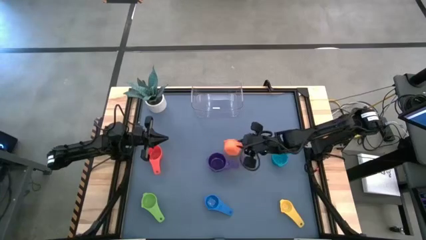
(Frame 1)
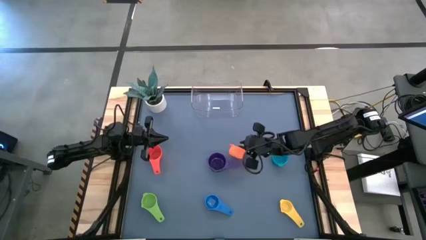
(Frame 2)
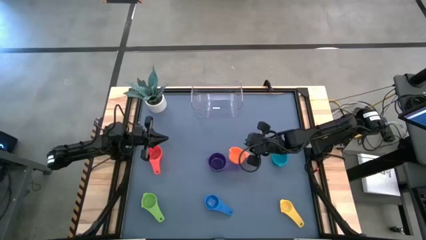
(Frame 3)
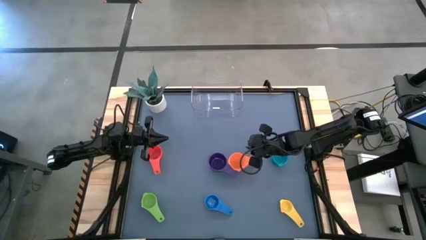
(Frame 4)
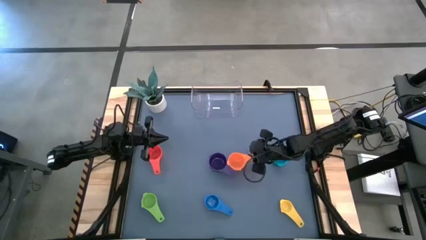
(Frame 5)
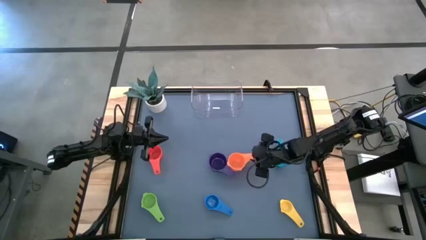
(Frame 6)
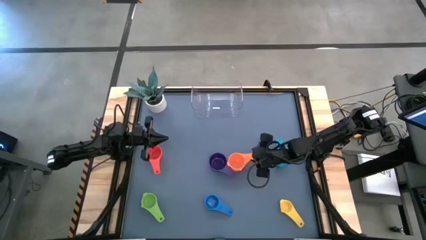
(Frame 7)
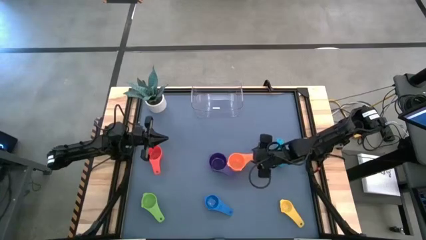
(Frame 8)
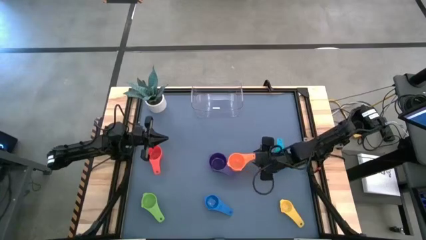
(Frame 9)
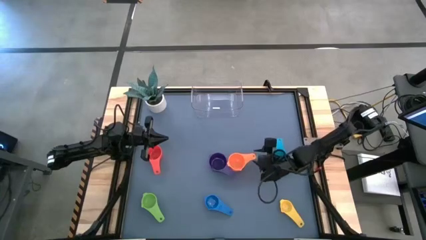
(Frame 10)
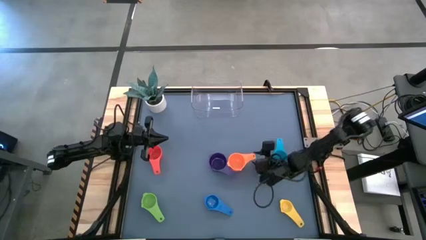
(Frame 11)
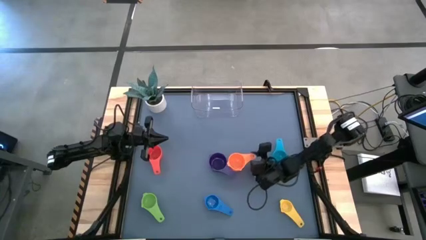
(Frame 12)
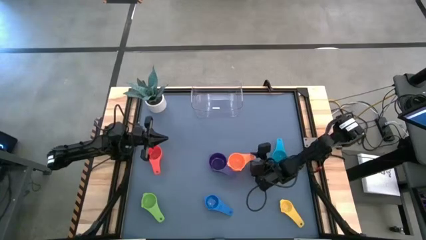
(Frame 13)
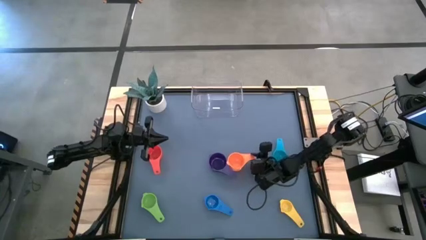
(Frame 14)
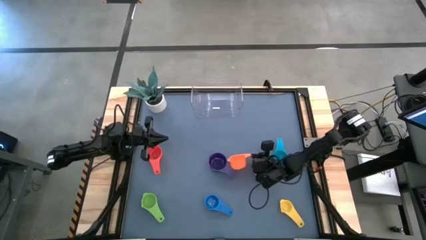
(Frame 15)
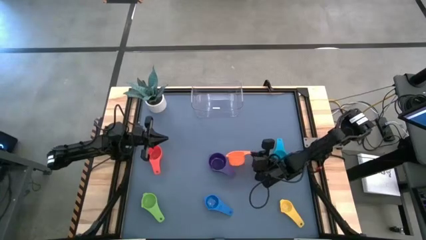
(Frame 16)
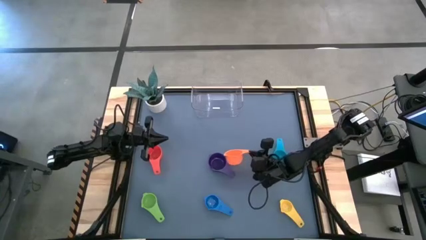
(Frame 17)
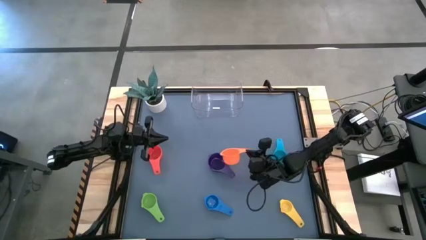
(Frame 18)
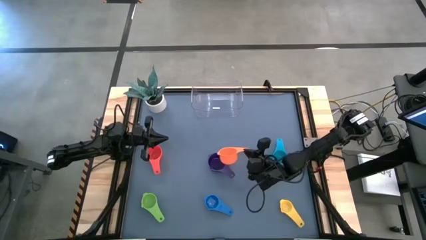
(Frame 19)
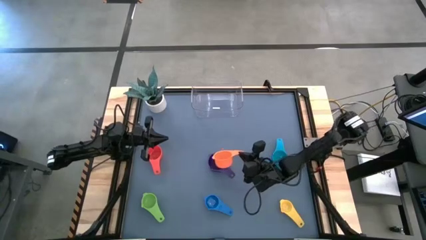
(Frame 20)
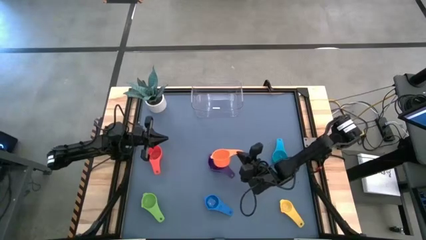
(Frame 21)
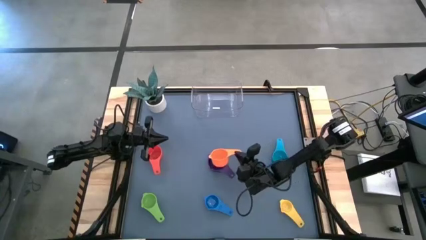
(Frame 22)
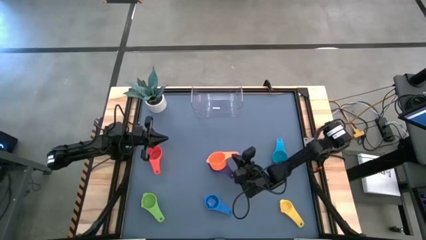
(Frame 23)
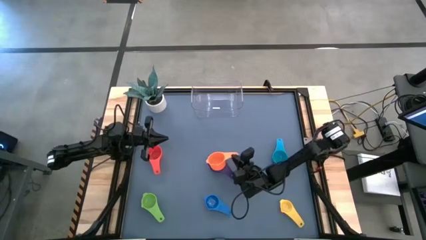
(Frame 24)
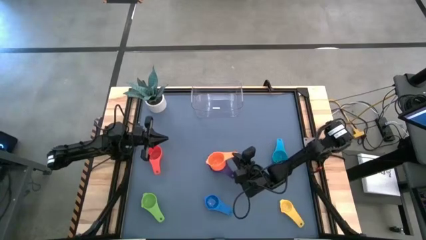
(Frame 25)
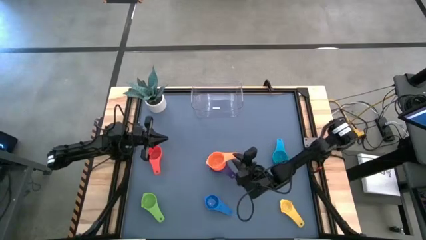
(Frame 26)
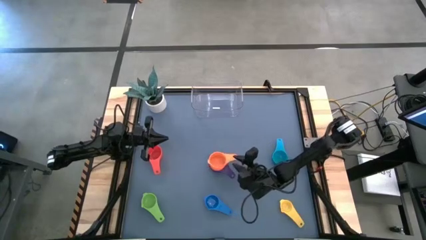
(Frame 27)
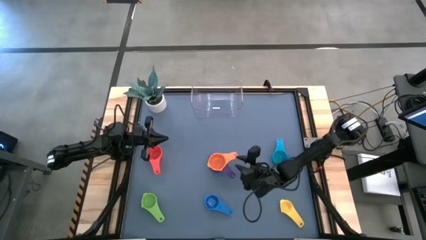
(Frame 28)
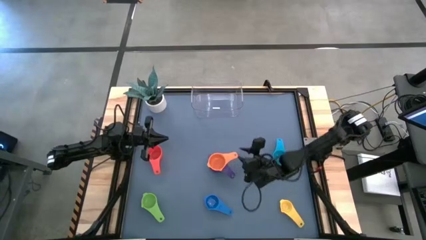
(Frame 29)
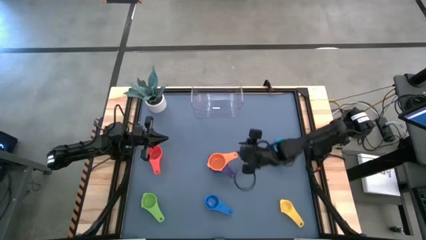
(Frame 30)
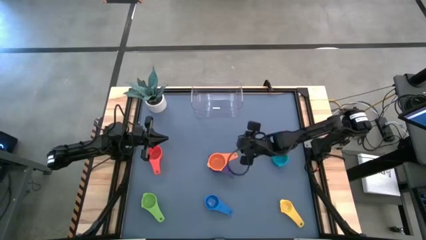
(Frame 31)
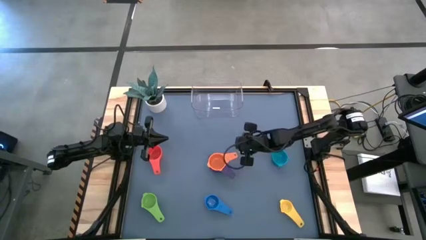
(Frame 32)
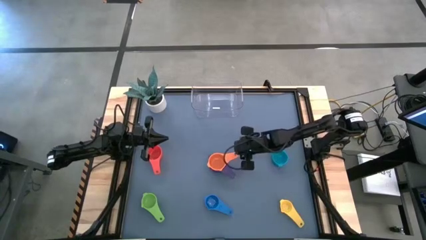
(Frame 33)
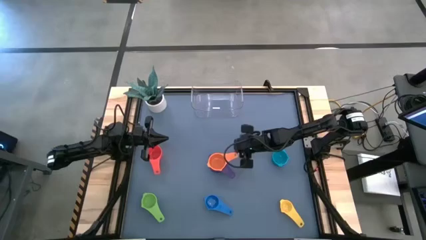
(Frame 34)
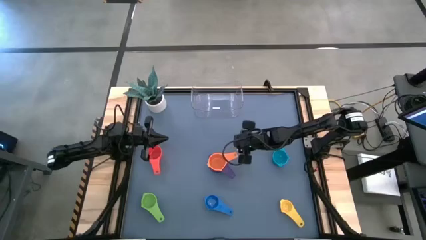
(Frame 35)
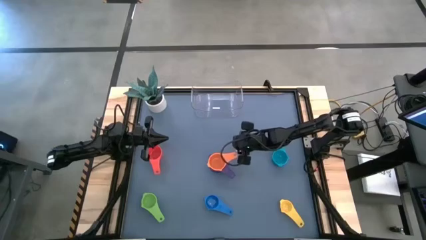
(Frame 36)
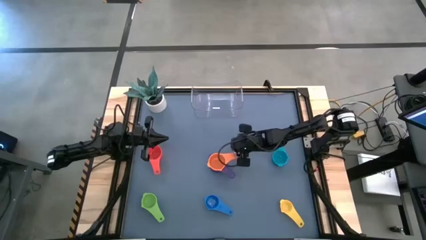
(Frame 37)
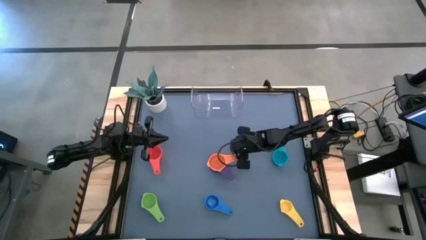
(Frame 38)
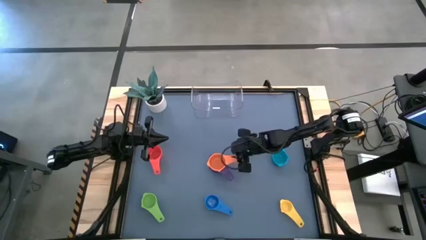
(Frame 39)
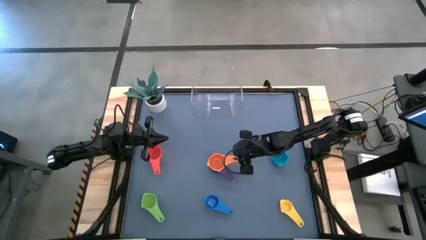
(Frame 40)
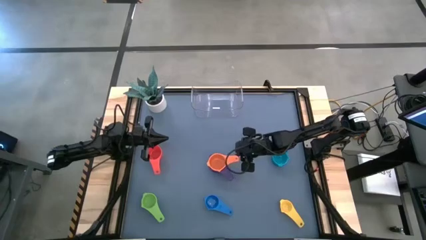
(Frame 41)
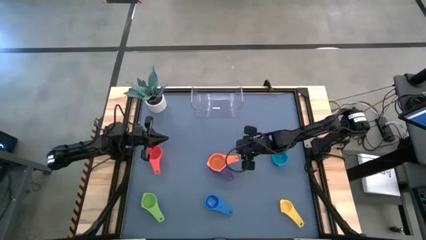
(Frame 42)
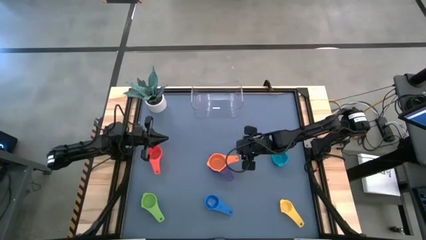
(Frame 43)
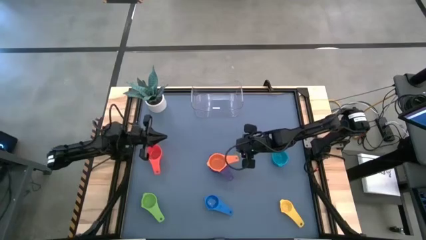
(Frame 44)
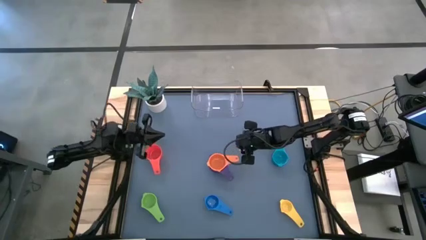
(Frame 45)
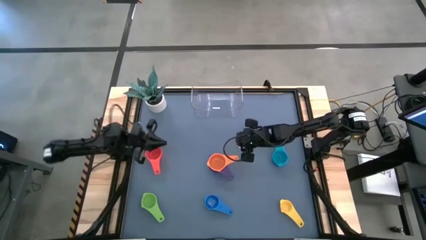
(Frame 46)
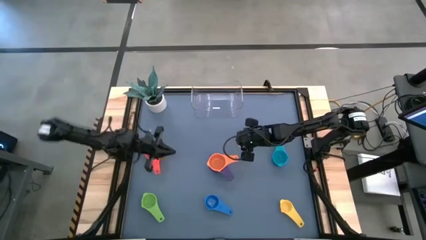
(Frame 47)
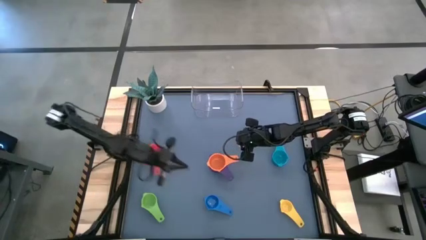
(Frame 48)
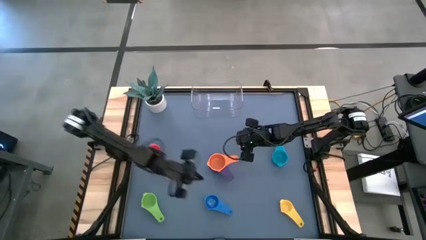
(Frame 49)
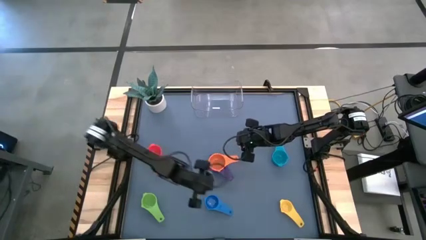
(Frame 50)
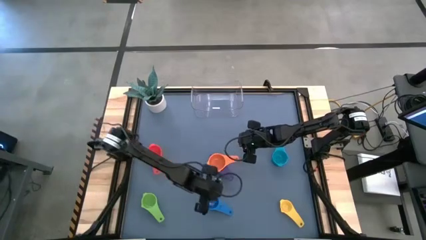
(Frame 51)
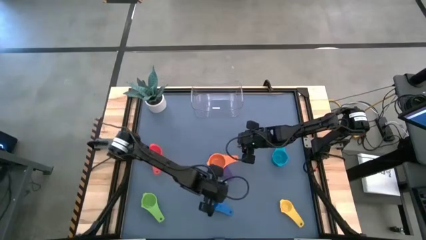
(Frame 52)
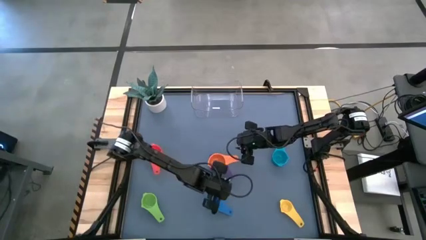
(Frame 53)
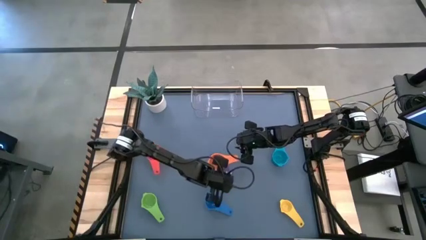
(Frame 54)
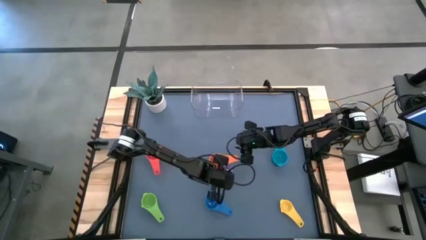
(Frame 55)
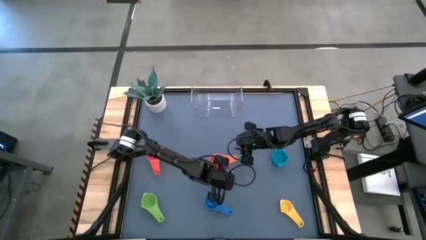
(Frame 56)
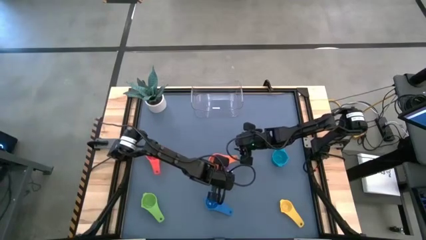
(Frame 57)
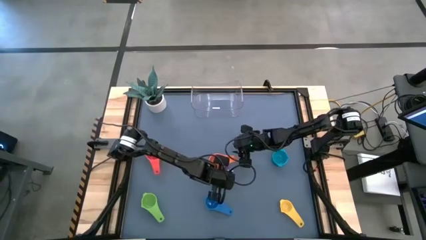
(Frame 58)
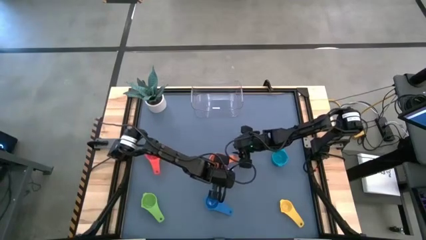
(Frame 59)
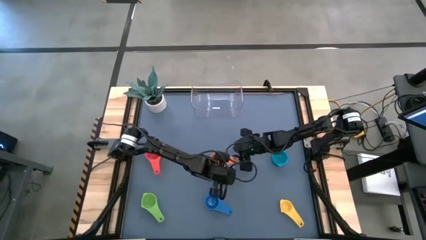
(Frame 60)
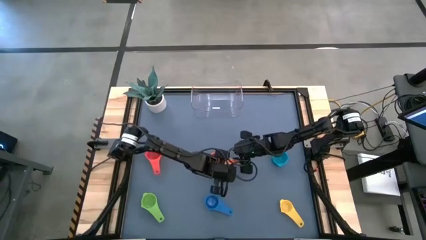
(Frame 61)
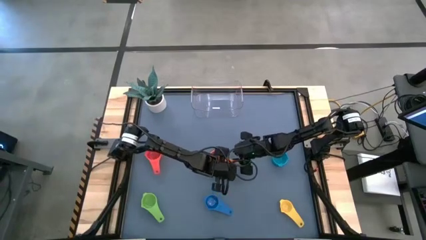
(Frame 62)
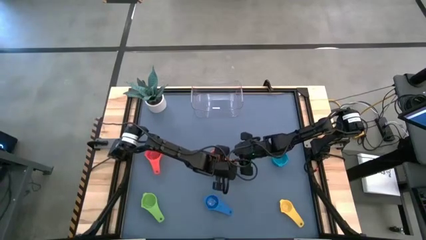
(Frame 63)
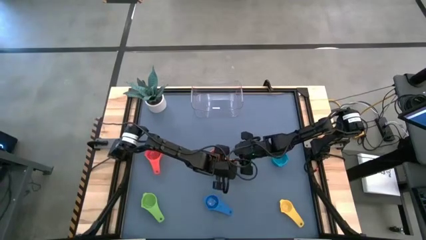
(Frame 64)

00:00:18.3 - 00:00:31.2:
Task: Nest measuring cups in basket
Stack the orange measuring cup on top of the purple measuring cup

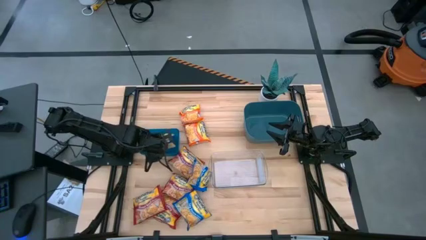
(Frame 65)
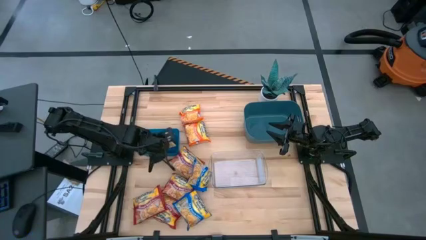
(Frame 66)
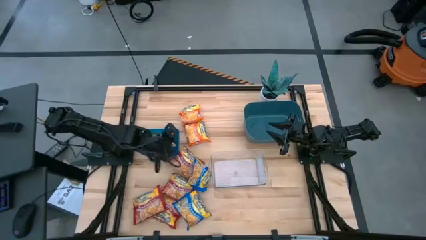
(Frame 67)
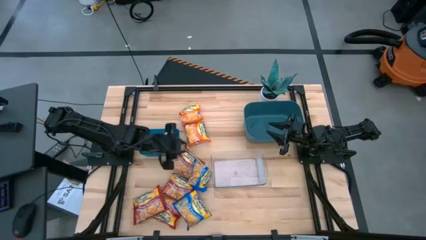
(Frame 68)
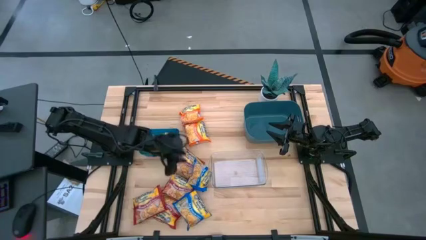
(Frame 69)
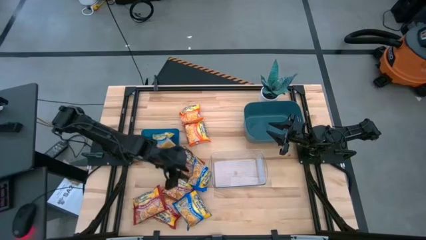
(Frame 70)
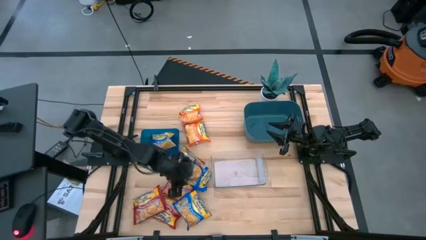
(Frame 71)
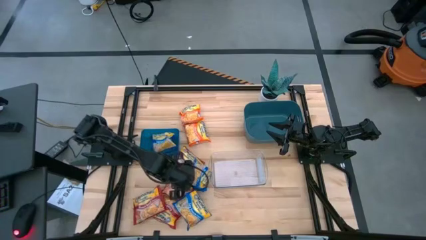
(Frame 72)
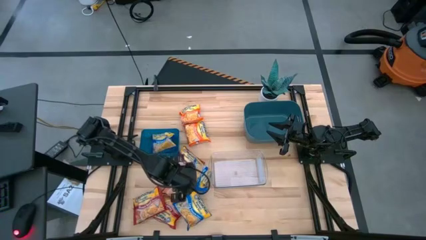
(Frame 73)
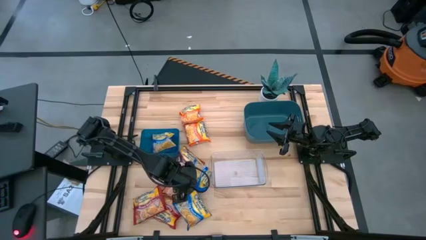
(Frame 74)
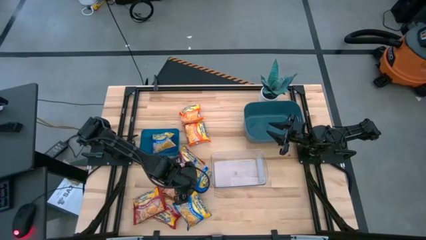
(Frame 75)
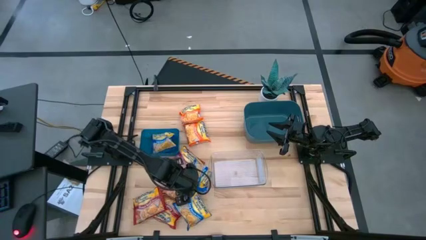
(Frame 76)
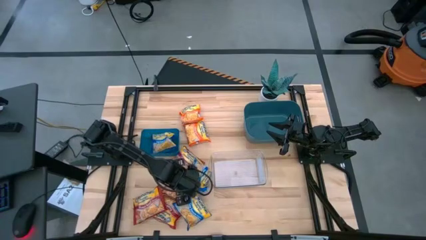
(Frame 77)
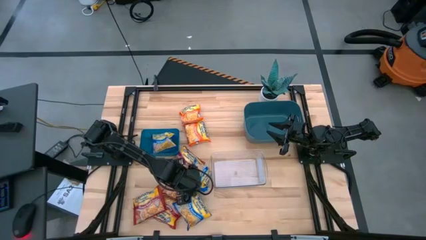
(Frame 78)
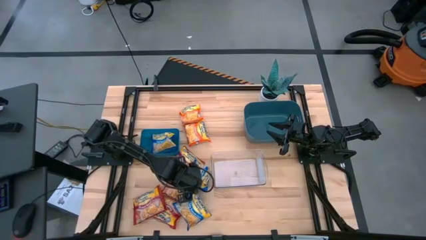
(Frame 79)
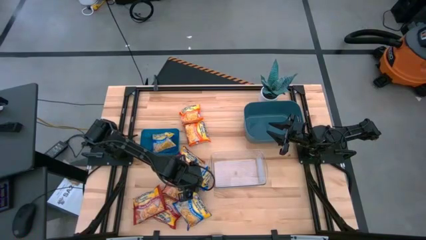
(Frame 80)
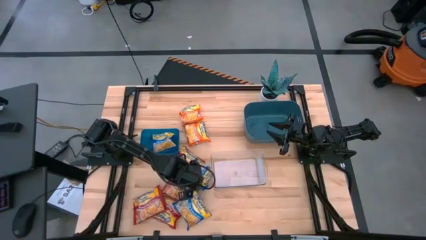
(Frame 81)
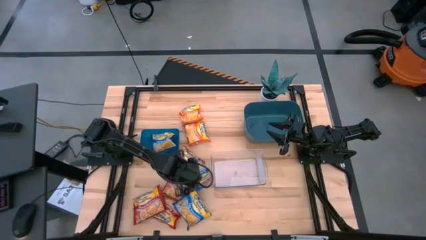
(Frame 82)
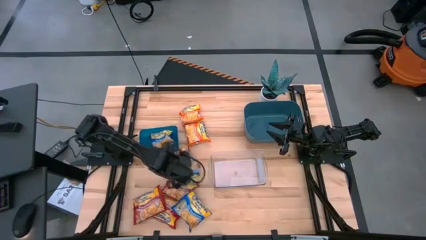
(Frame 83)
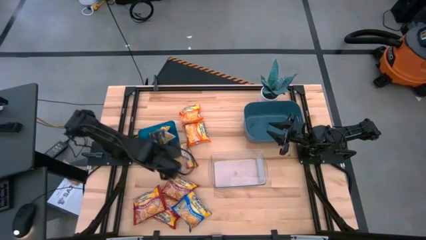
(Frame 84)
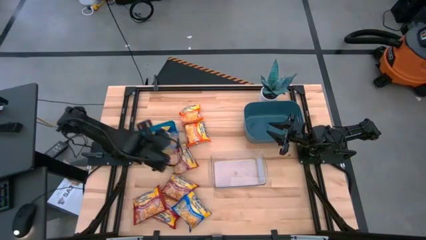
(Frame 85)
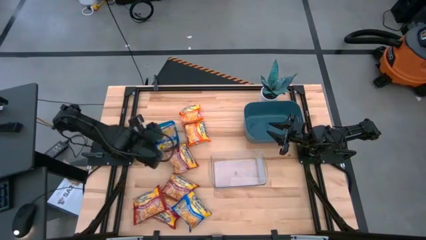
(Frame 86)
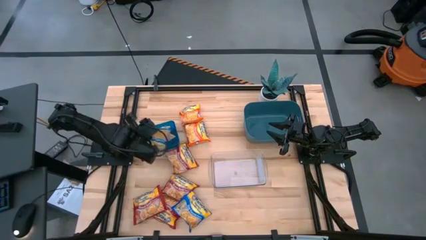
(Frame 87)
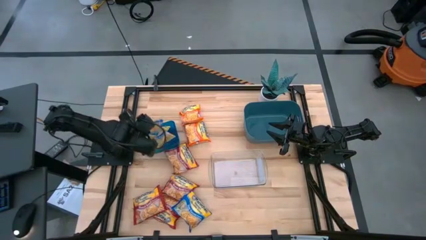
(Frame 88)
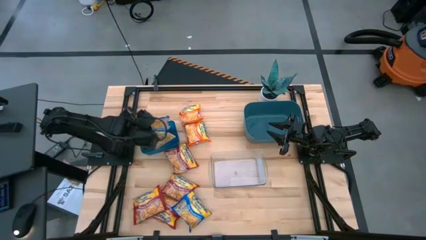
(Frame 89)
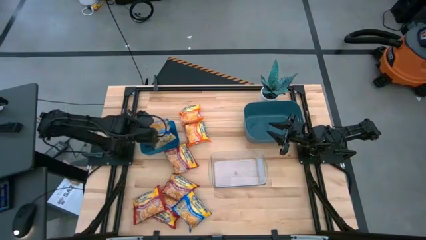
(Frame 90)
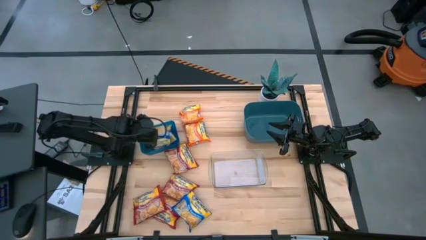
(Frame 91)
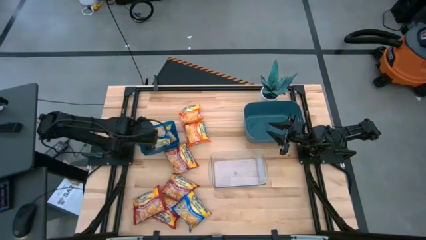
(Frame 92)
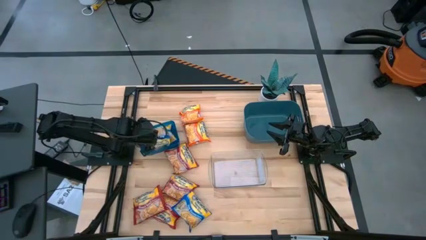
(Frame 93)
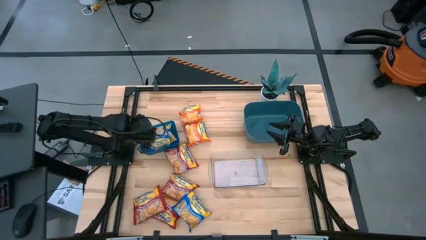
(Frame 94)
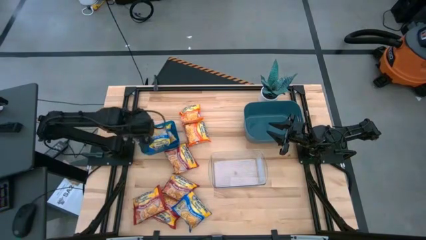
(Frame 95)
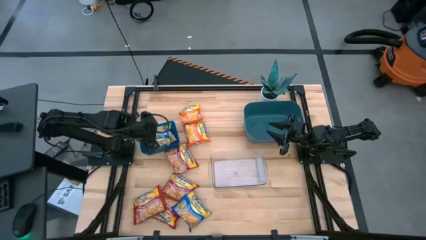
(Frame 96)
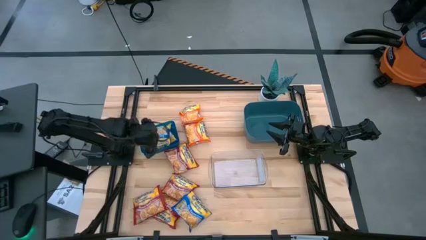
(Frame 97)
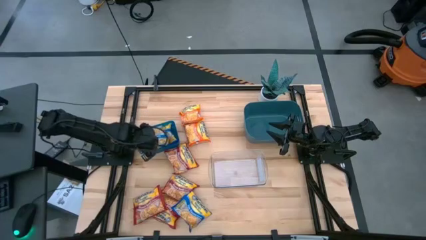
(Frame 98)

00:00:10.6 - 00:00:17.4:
Task: Sort Maruchan noodles
Put the blue noodle pack into the blue bin
